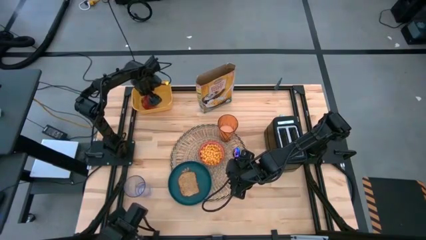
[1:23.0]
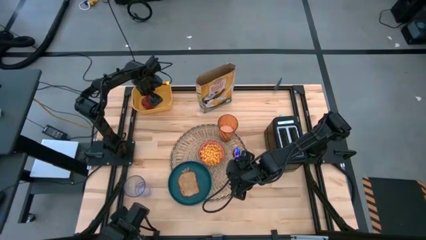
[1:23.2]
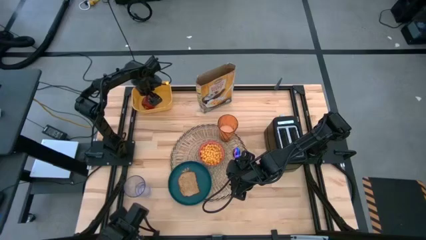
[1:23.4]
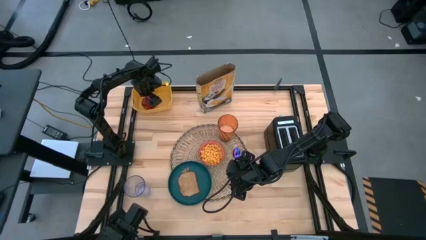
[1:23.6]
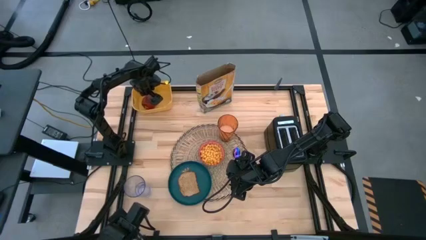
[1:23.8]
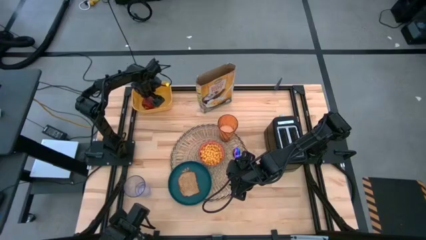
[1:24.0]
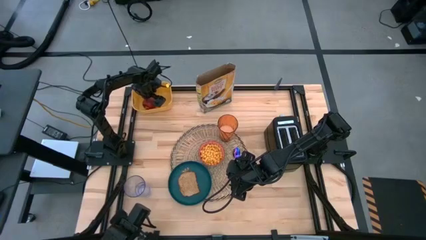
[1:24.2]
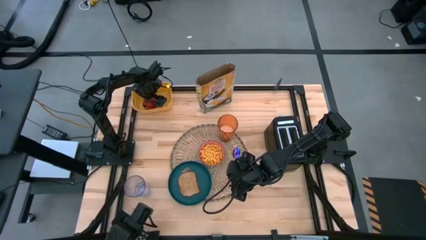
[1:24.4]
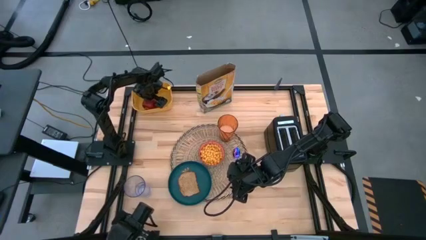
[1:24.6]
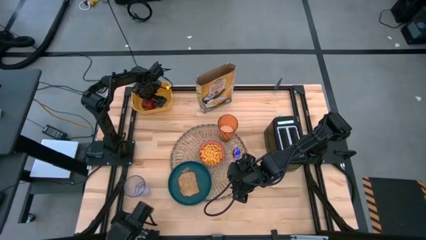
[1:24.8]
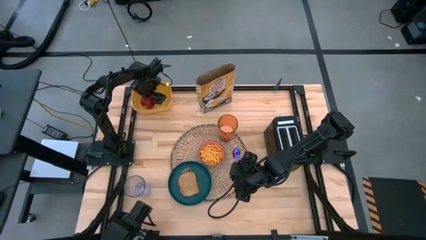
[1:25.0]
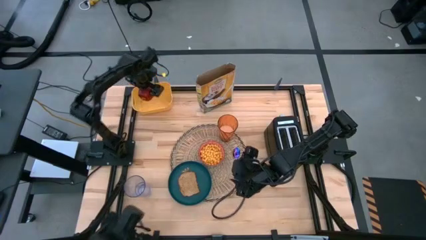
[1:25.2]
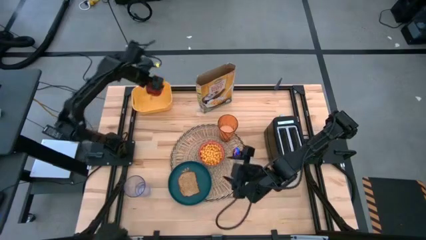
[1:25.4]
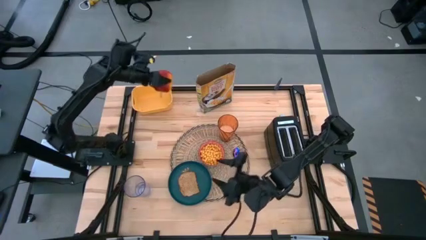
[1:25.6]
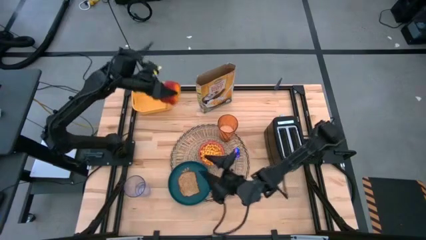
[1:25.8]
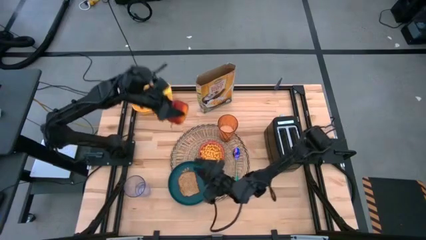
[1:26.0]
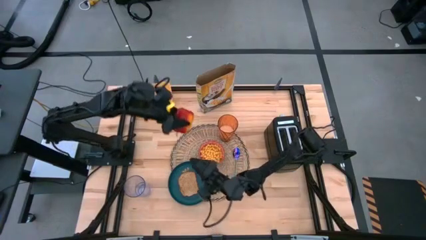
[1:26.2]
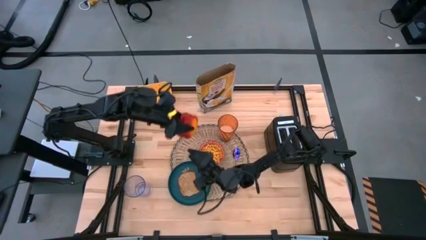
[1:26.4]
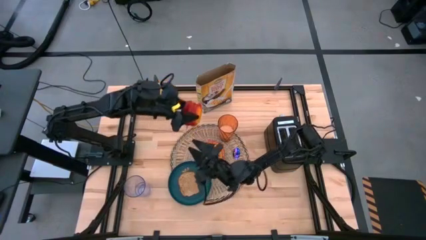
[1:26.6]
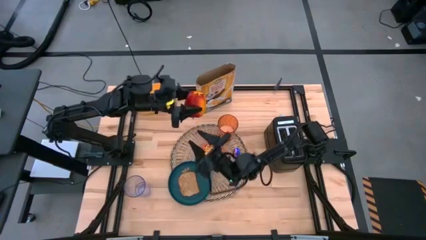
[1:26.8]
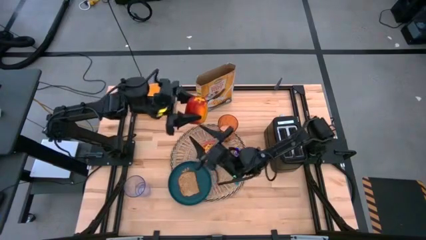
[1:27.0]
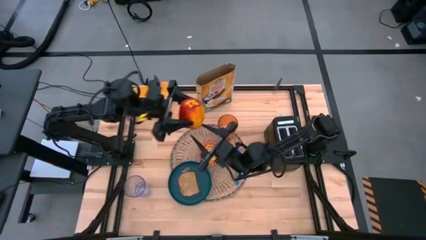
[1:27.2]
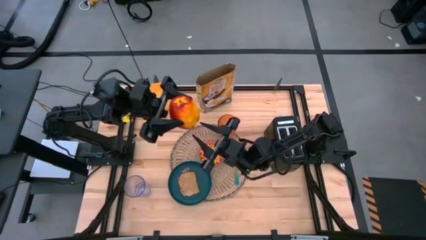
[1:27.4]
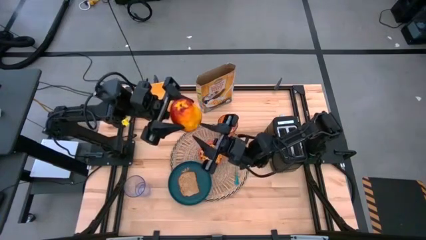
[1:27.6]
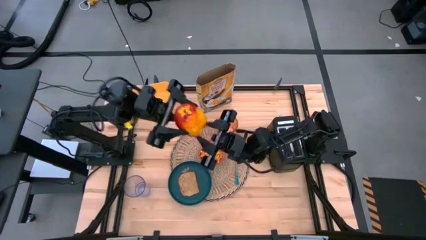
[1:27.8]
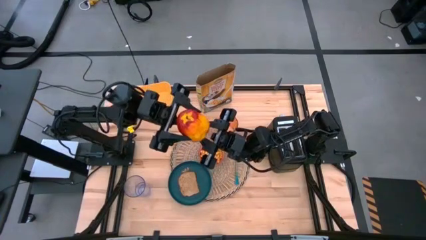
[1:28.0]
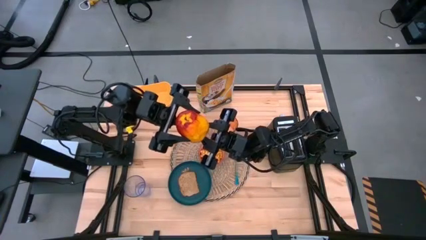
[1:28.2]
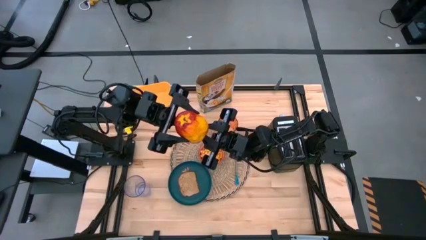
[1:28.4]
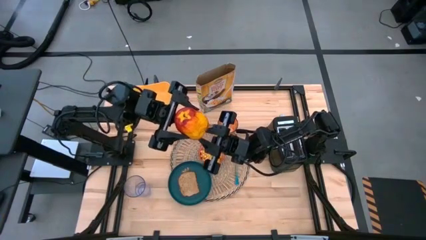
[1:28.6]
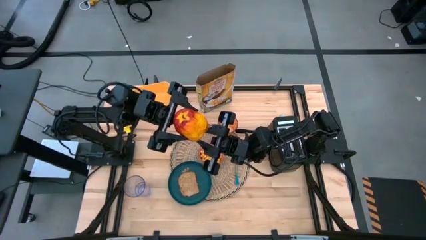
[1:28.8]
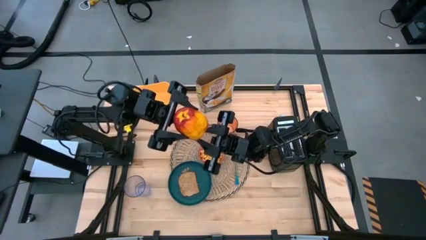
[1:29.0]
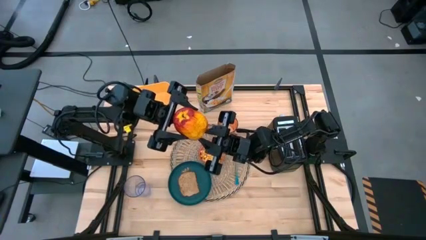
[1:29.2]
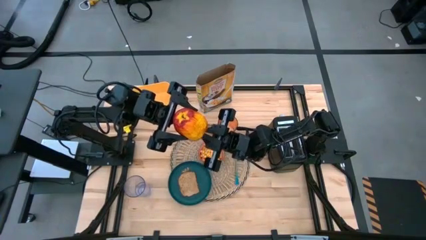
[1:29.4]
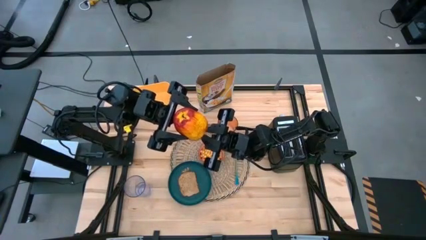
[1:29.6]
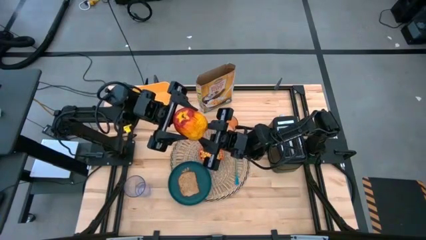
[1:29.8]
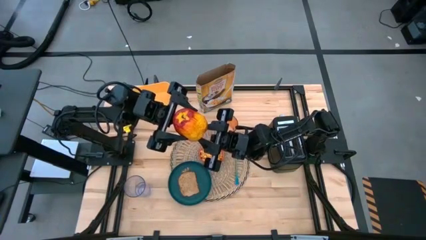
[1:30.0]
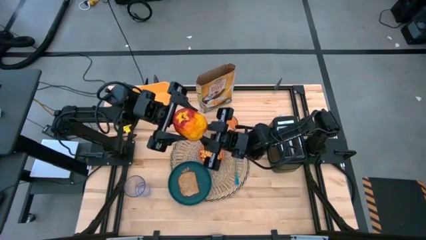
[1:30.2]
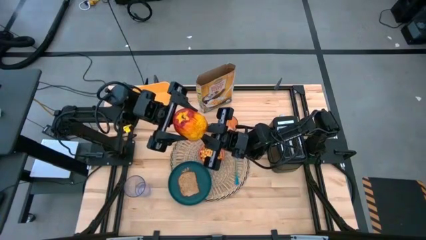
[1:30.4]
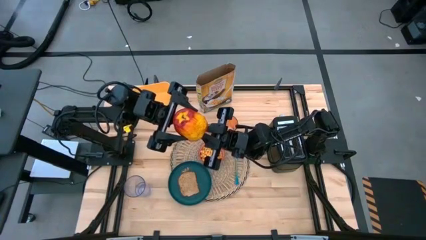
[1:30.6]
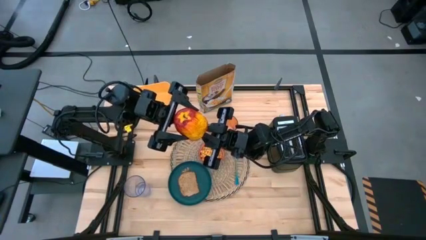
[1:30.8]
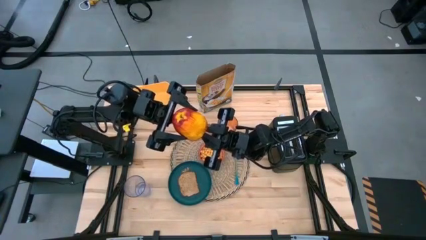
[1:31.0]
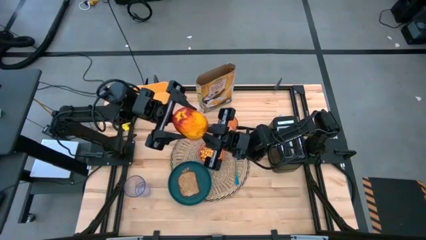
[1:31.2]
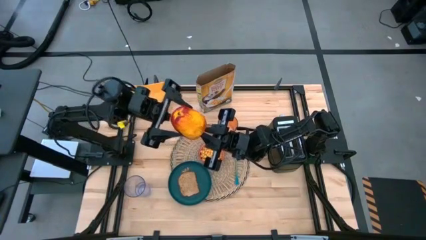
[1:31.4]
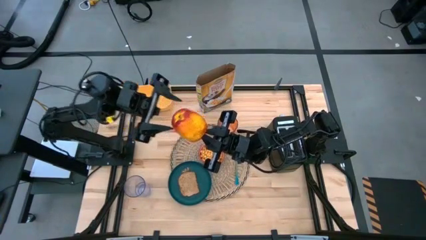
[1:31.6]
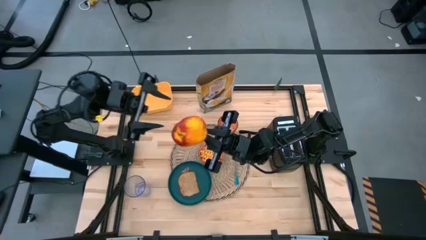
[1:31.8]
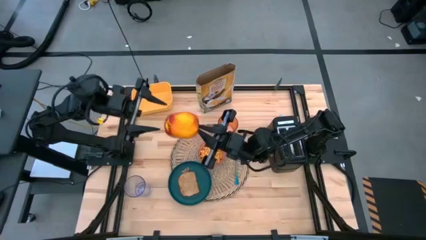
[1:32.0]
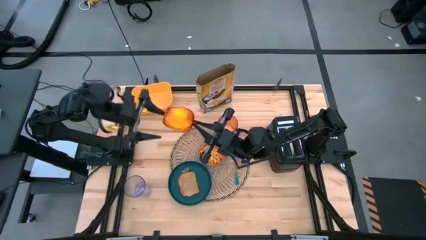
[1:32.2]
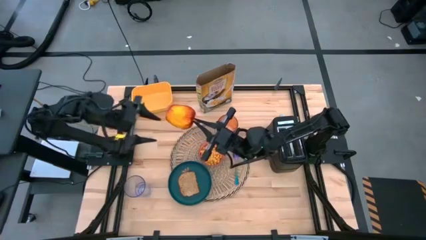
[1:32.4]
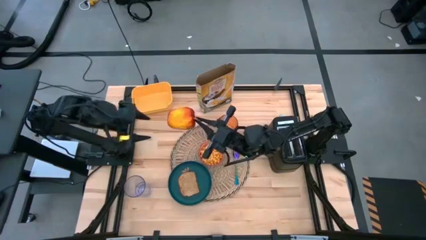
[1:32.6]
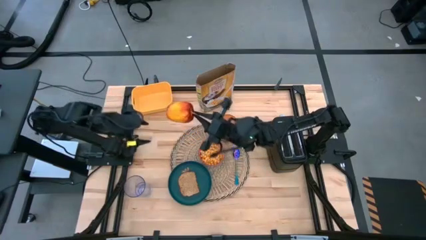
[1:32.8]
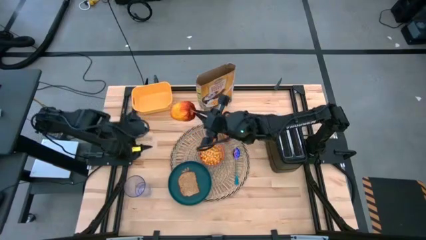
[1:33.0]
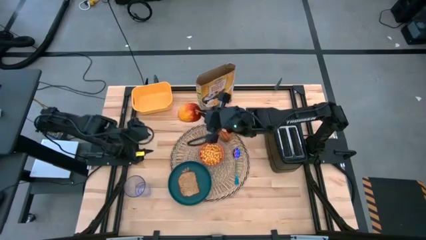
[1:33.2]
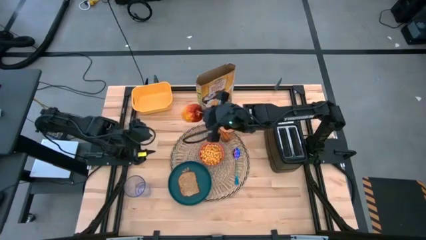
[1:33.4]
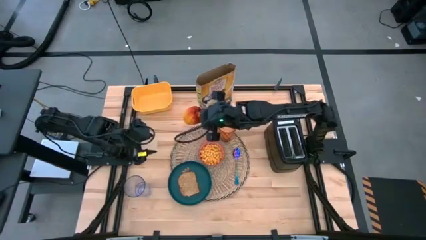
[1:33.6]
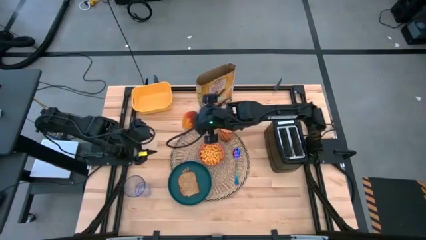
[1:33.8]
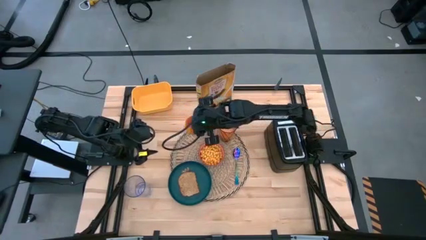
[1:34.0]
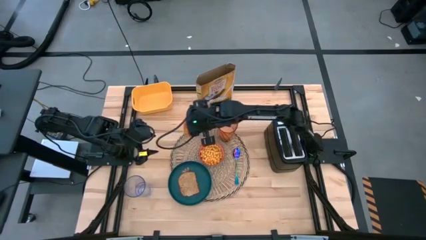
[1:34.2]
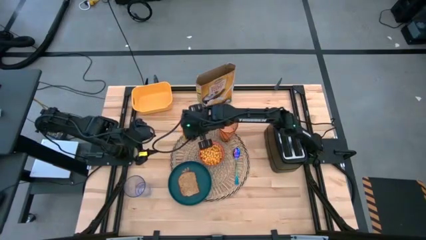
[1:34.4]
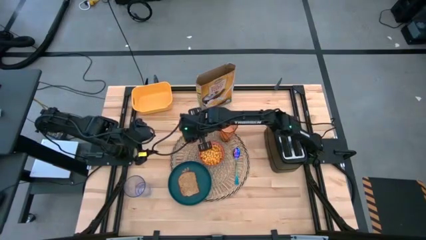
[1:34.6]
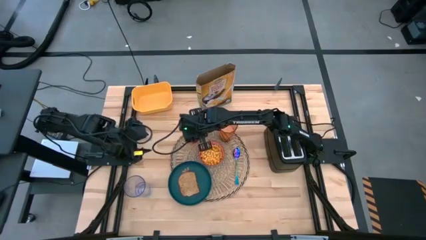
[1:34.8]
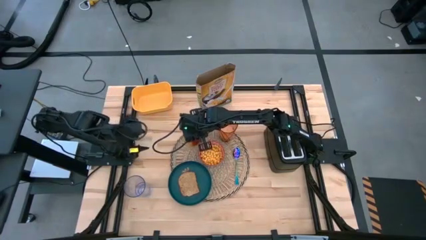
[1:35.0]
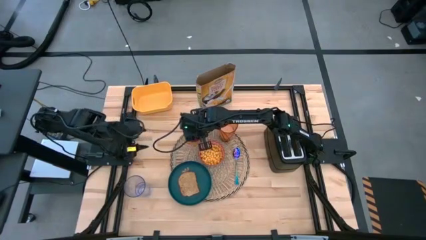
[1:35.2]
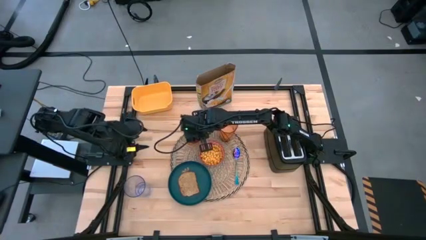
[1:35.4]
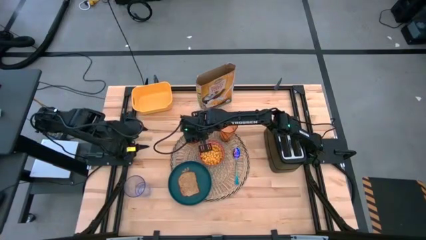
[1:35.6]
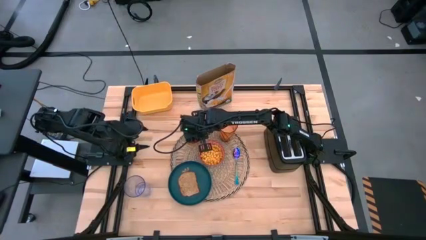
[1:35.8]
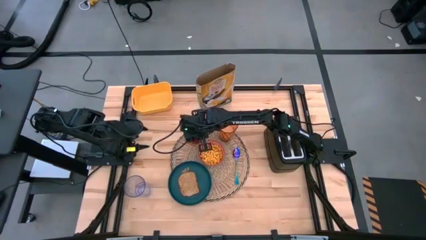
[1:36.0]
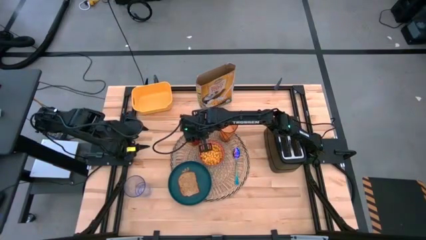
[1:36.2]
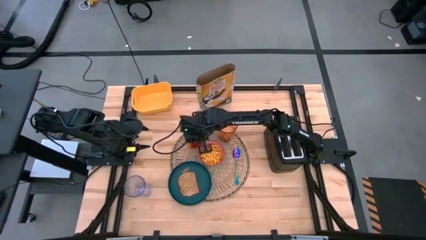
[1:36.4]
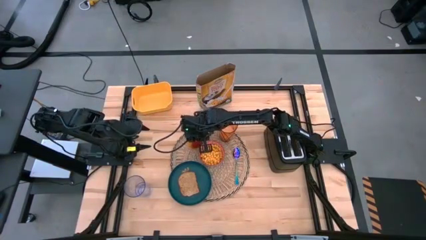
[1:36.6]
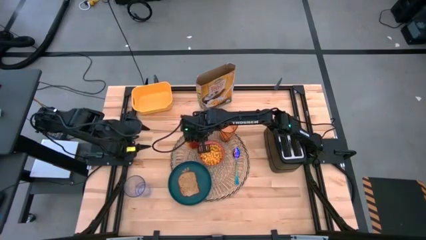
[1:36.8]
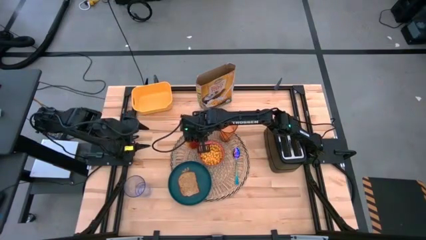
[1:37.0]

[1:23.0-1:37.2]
Task: Arrange a breakfast setting
Put the red apple on the placemat to the top left of the red bowl
